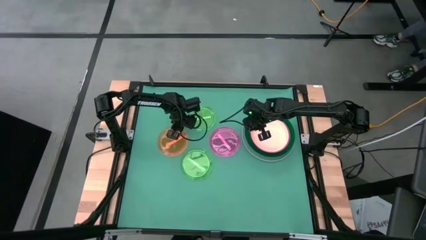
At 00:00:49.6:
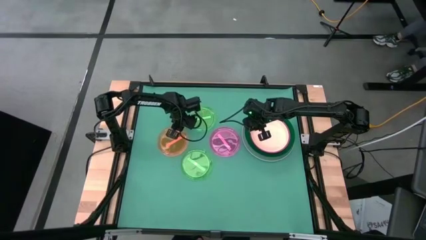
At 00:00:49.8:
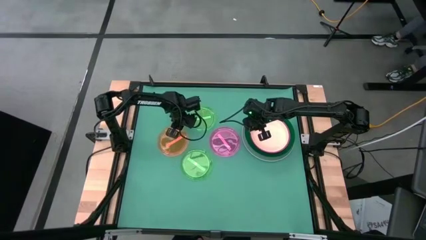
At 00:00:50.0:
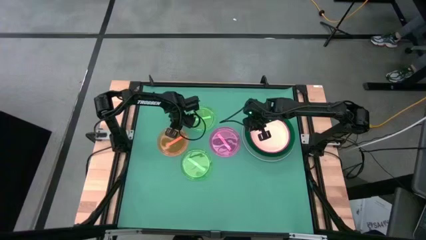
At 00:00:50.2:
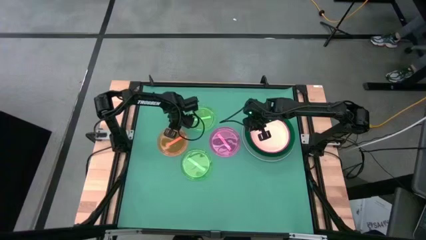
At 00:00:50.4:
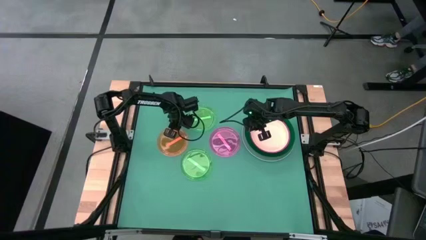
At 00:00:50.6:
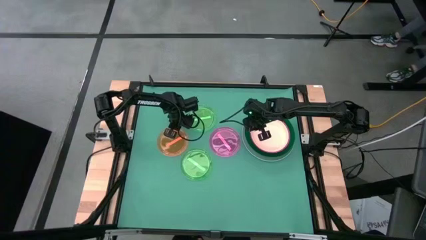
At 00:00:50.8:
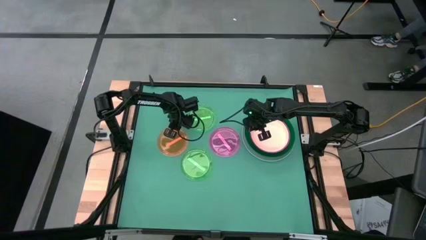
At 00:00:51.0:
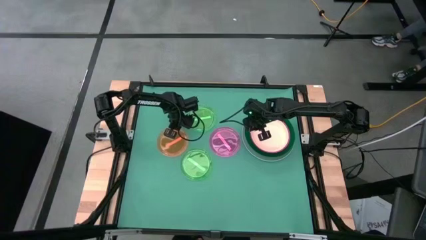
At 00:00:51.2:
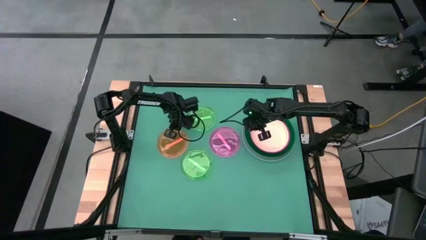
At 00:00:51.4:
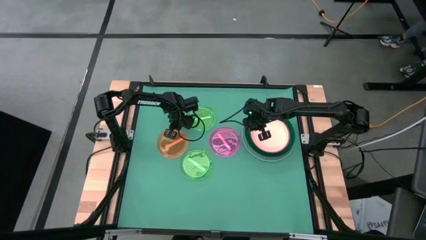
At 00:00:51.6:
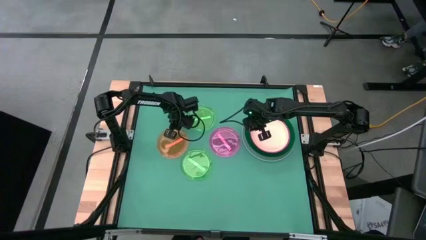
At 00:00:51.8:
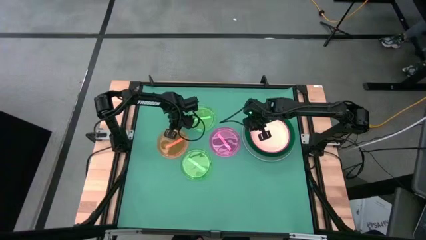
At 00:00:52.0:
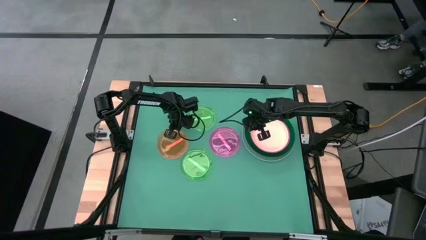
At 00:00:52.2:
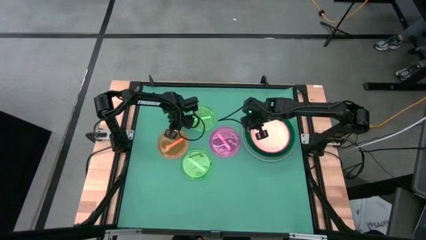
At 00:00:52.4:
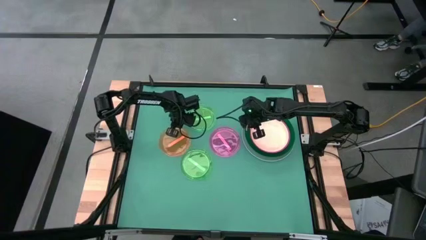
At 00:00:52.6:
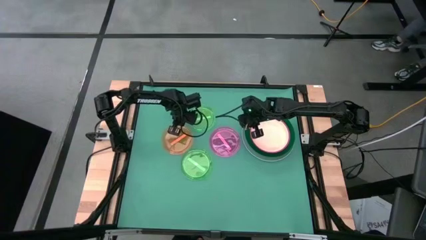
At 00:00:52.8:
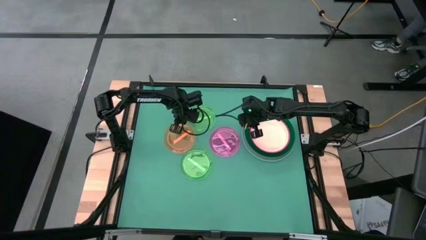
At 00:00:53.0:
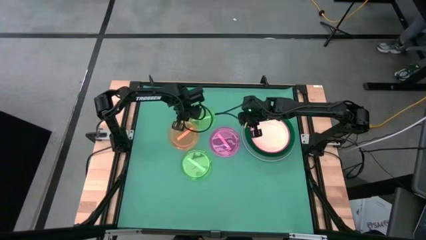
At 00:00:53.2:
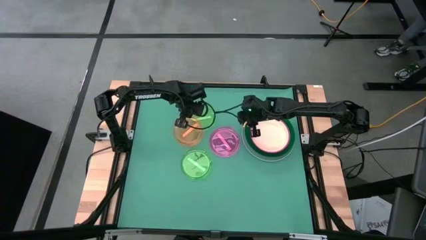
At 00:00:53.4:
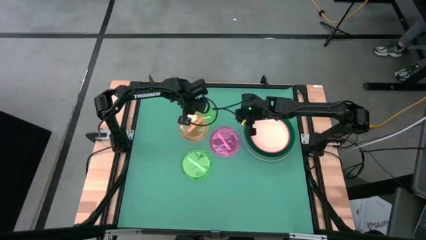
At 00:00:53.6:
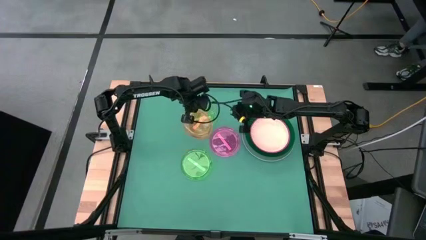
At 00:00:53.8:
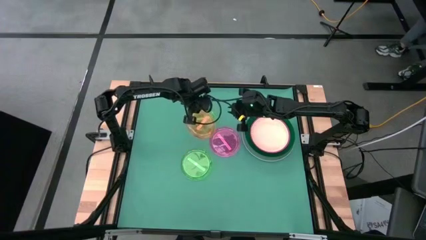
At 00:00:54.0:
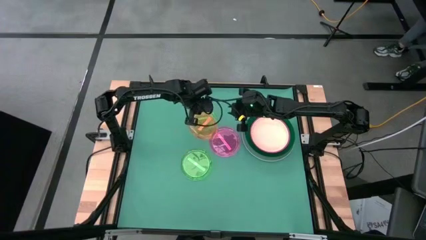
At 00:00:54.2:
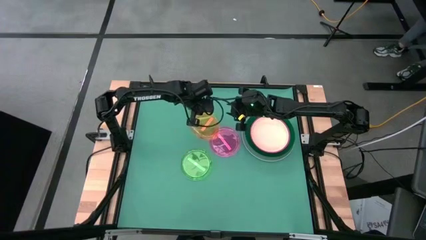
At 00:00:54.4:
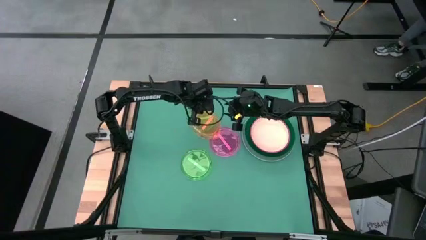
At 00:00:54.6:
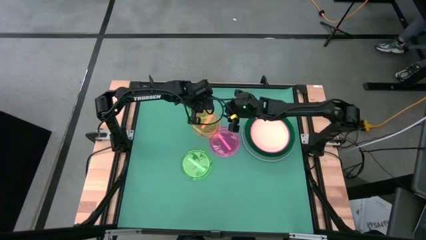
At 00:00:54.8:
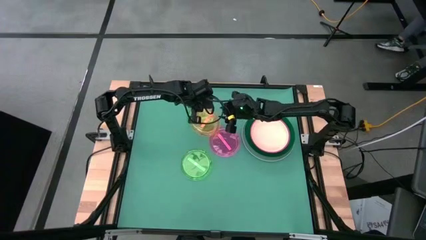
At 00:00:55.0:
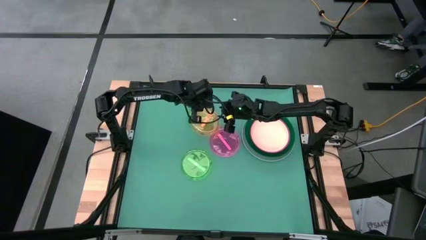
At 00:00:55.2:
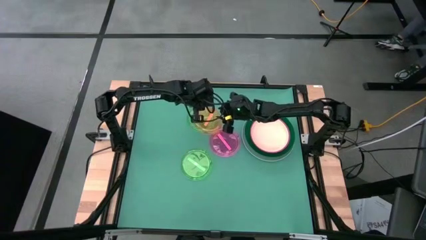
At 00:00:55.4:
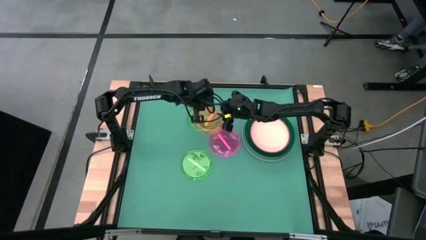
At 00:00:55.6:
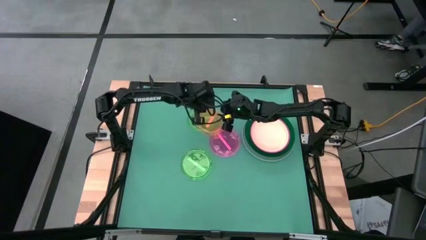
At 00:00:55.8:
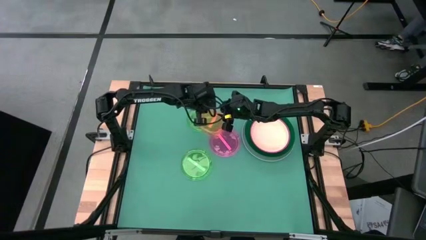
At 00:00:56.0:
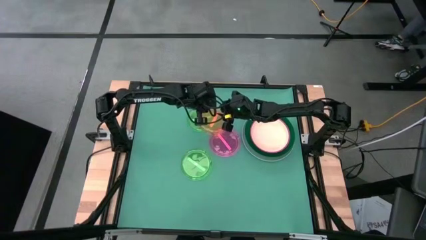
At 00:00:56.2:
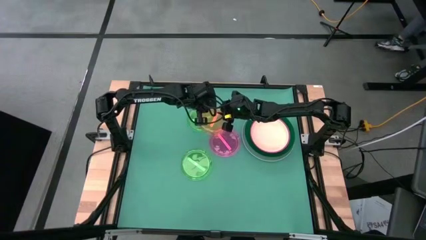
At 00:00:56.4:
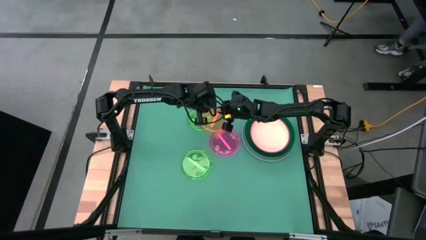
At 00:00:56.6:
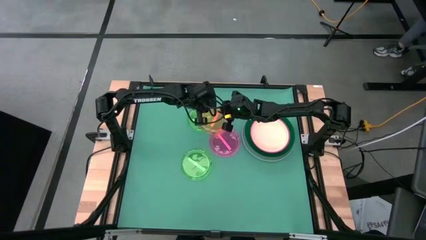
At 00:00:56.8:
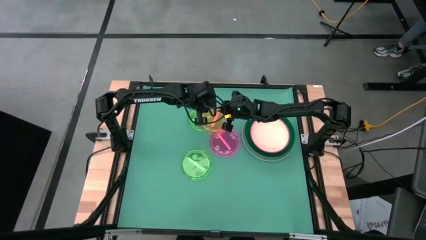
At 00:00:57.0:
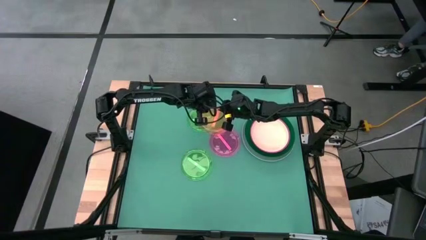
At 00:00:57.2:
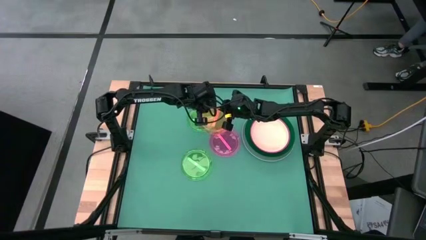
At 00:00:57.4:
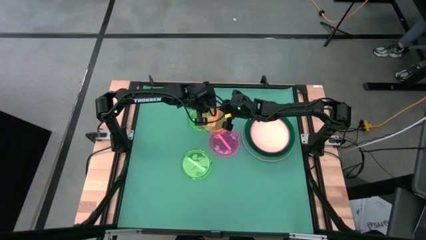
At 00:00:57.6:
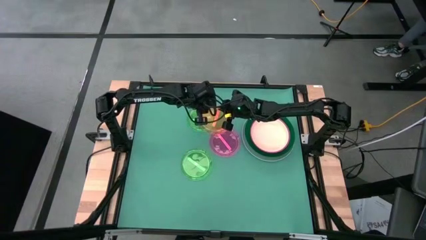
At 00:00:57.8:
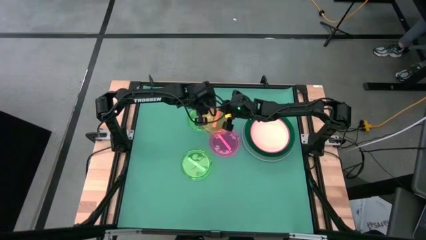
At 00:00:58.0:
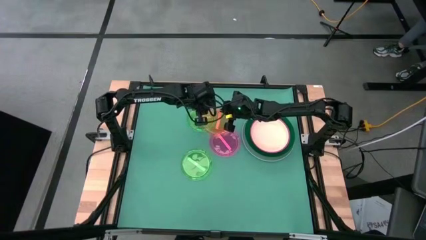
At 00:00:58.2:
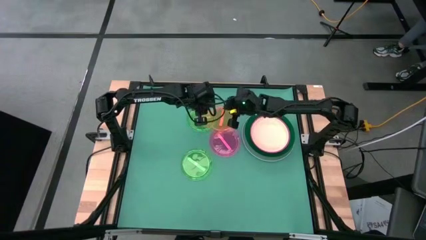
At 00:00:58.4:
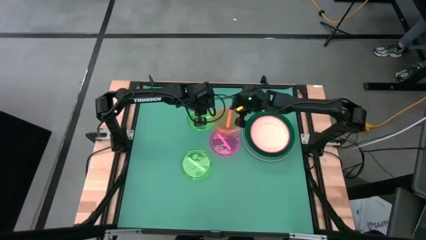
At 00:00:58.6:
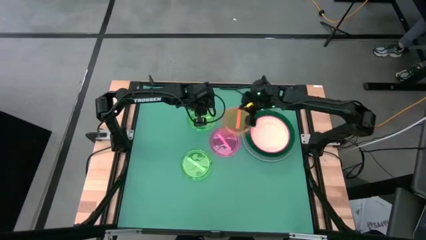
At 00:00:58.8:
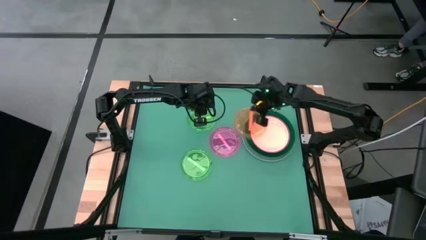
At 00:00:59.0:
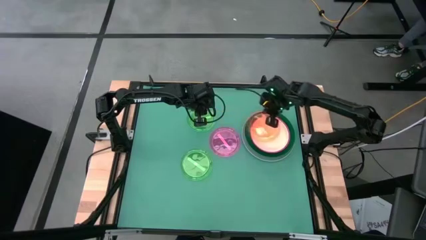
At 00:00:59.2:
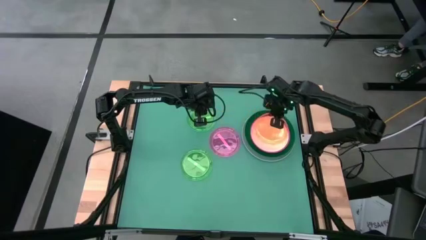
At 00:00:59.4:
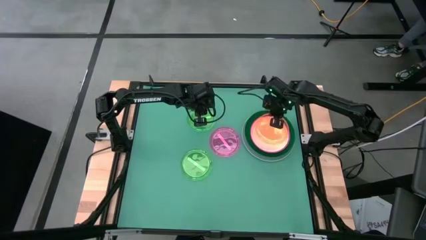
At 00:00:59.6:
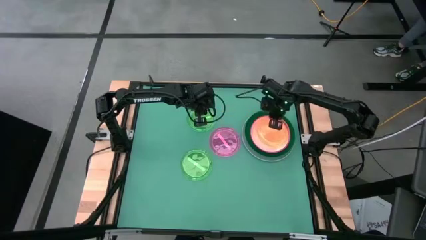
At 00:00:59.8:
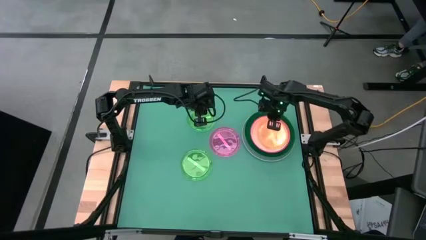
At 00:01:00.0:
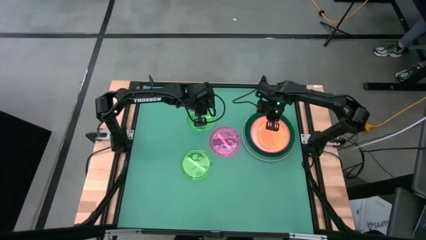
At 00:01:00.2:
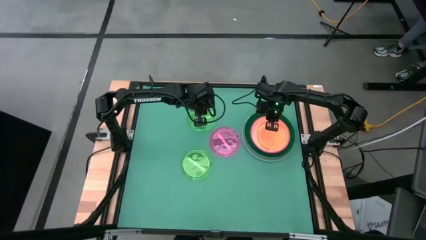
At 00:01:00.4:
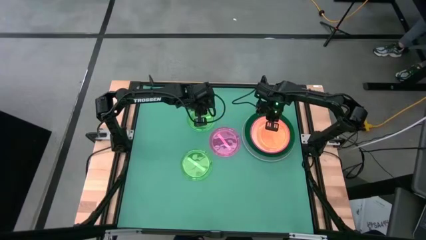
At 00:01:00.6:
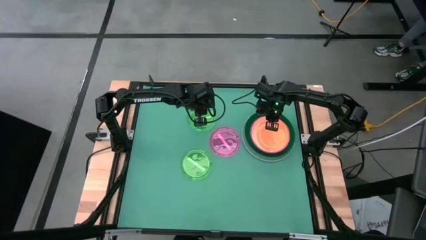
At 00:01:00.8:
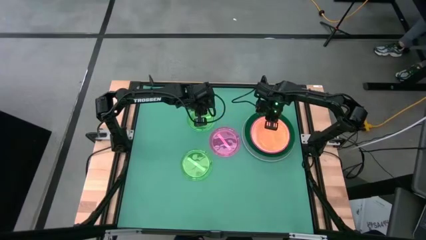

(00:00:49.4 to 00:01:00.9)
Task: Stack plastic plates
Stack the orange plate on top of the white plate

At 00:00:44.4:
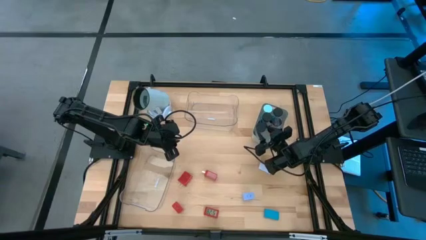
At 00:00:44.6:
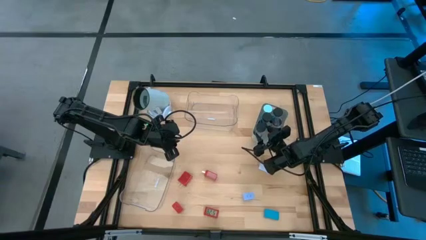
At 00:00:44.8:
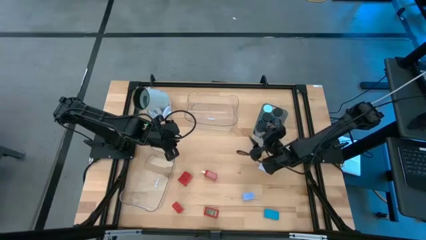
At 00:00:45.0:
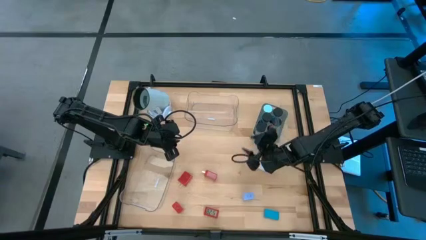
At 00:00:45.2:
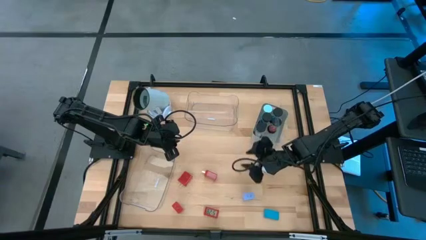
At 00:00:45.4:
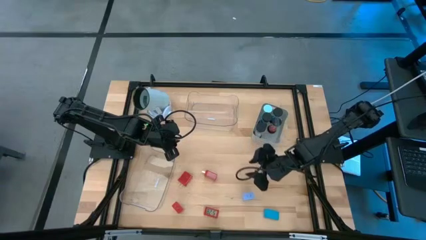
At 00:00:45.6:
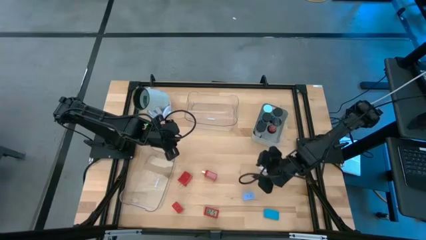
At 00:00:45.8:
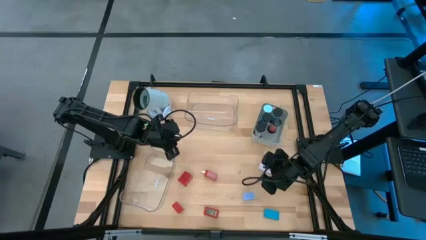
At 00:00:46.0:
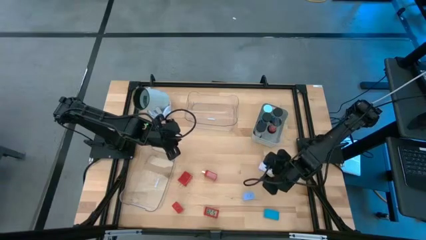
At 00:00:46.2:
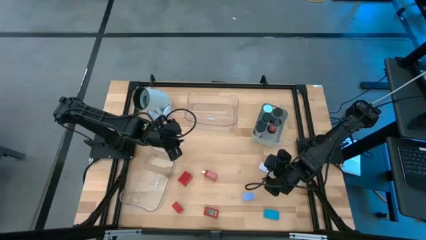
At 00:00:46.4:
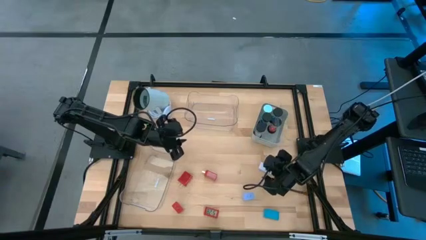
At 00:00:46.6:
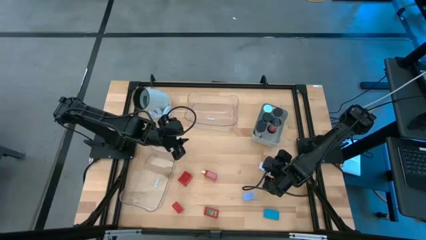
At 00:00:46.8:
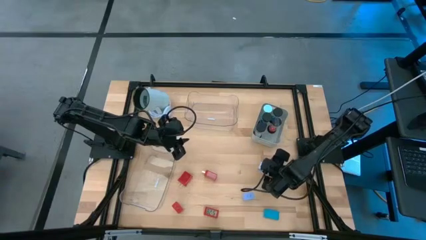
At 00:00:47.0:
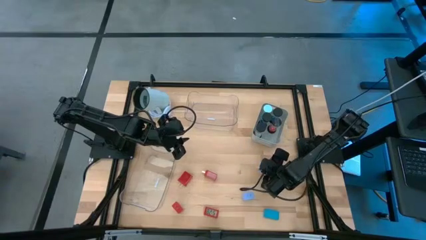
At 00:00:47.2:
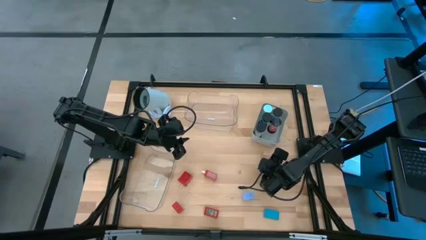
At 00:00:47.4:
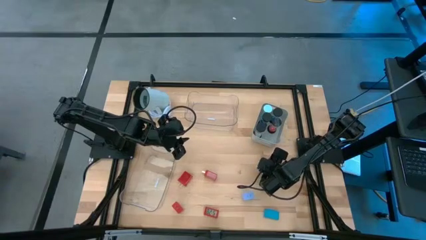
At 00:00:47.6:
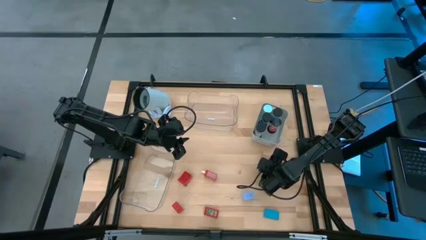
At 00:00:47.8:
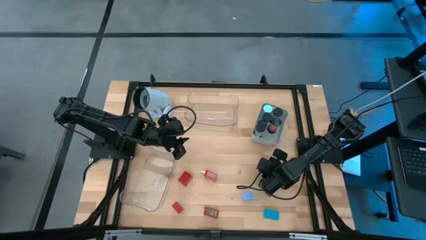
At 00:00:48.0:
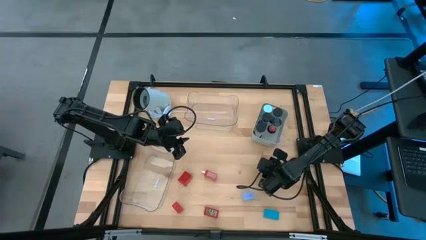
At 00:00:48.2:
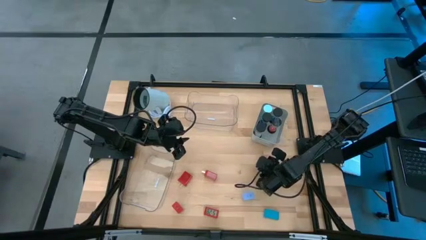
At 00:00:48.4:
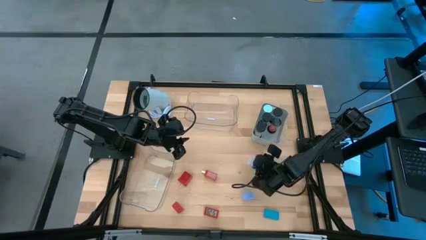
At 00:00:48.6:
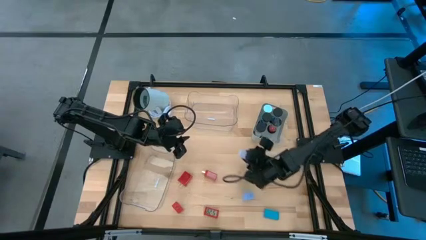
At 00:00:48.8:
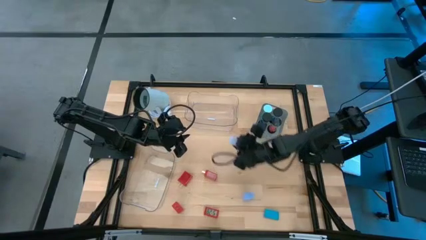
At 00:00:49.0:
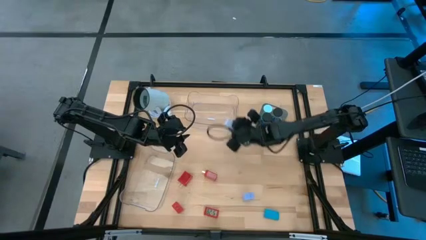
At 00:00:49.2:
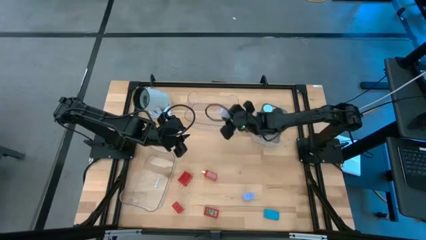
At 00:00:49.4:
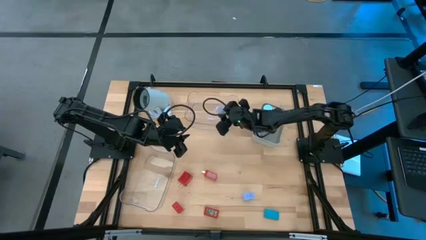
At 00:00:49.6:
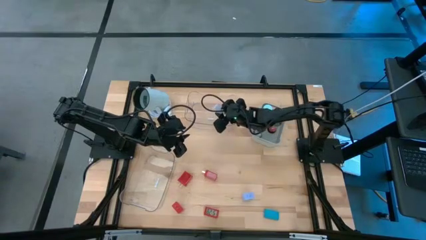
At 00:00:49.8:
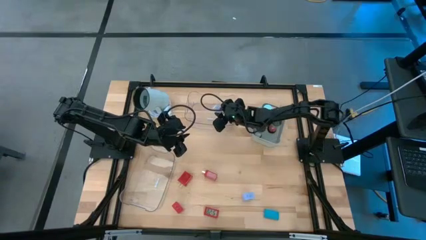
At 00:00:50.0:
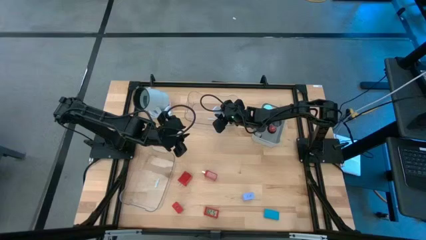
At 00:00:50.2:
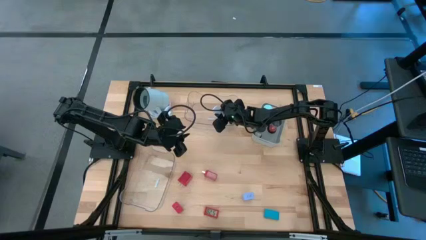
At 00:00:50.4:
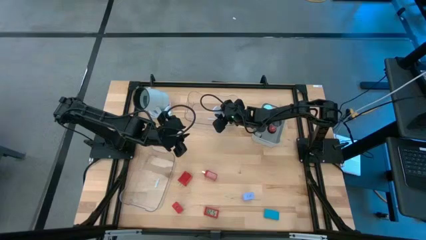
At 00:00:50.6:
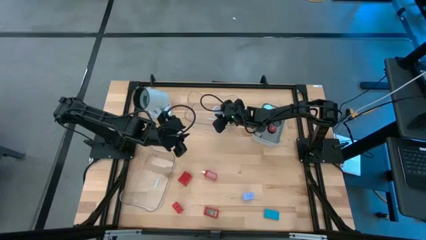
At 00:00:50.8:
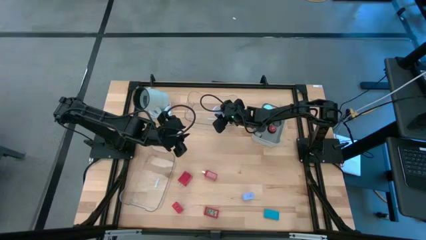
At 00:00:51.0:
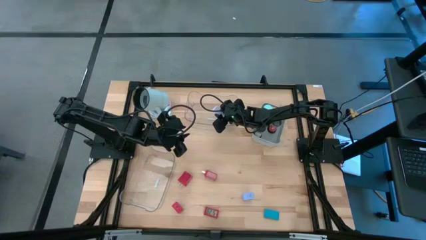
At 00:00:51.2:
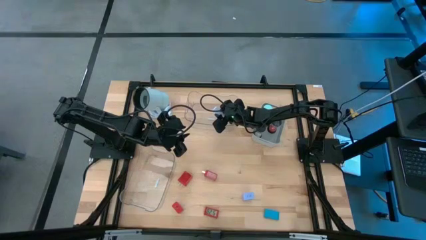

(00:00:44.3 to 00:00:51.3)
Task: Pick & Place Office items
Put the white digital timer clock into the top clear bin
